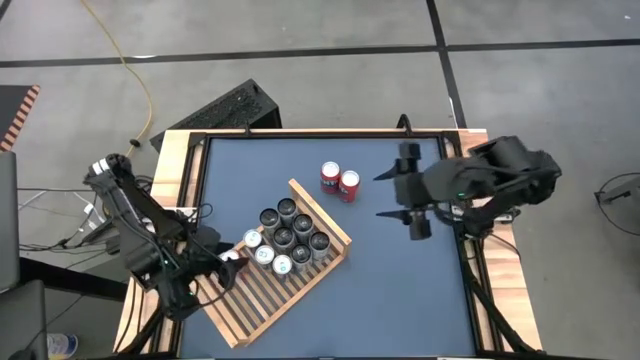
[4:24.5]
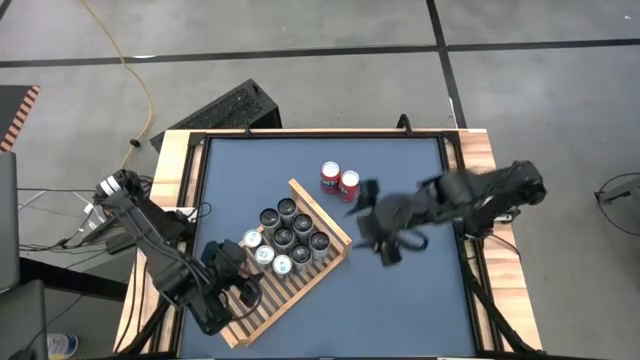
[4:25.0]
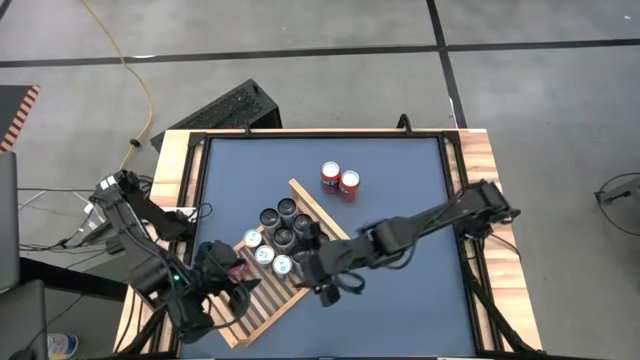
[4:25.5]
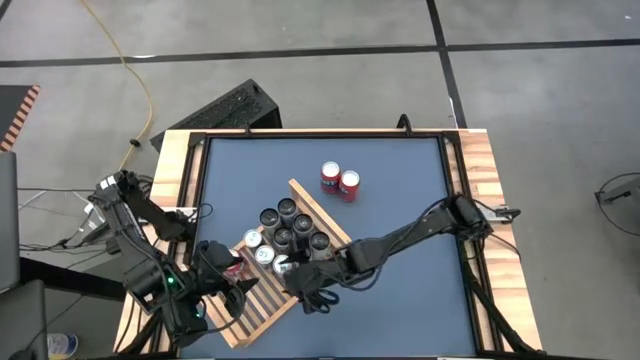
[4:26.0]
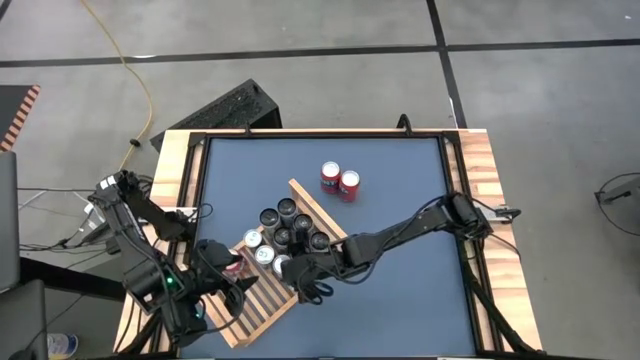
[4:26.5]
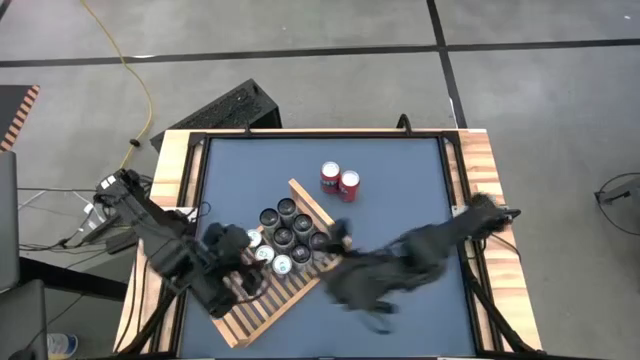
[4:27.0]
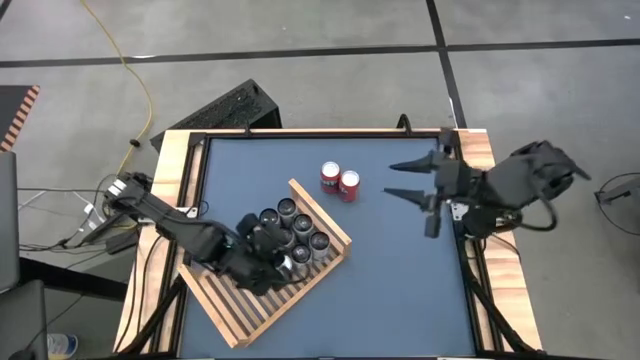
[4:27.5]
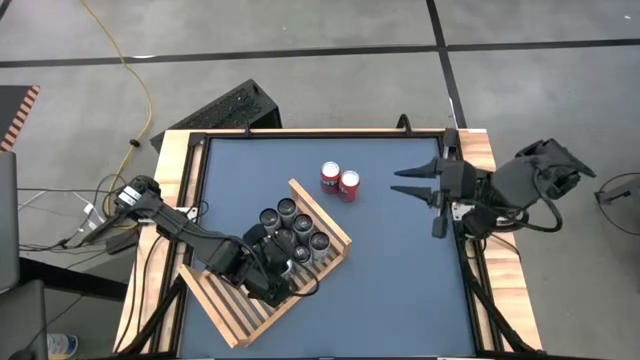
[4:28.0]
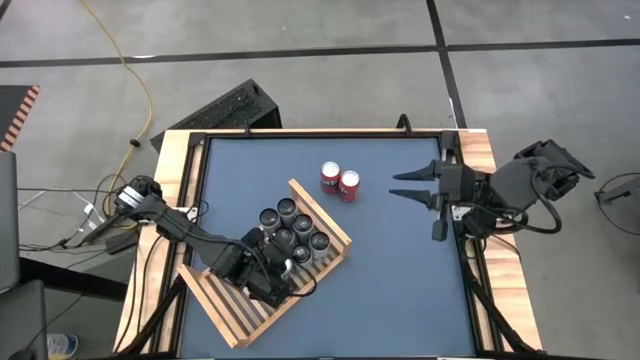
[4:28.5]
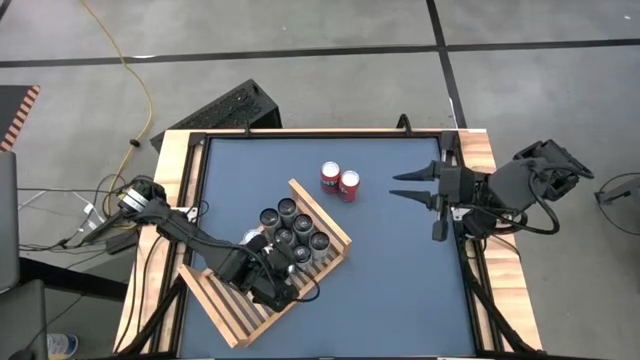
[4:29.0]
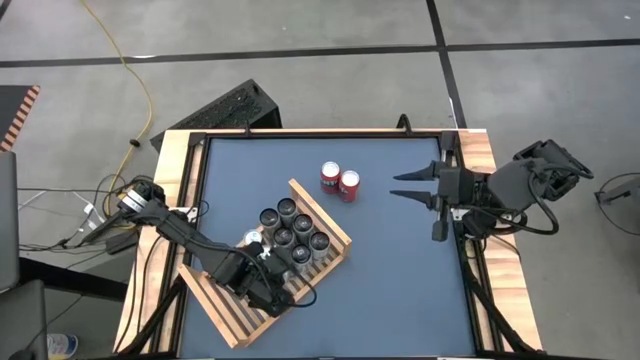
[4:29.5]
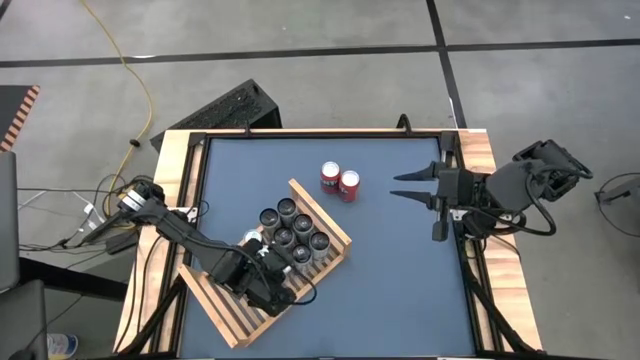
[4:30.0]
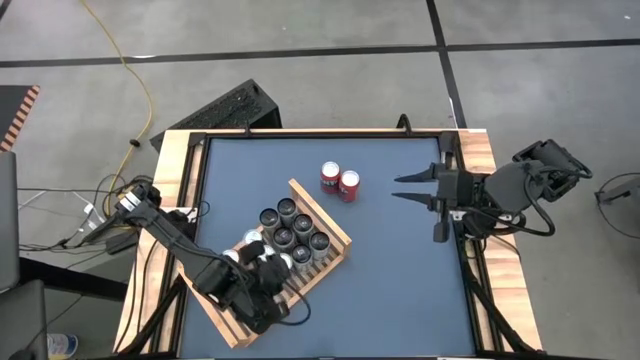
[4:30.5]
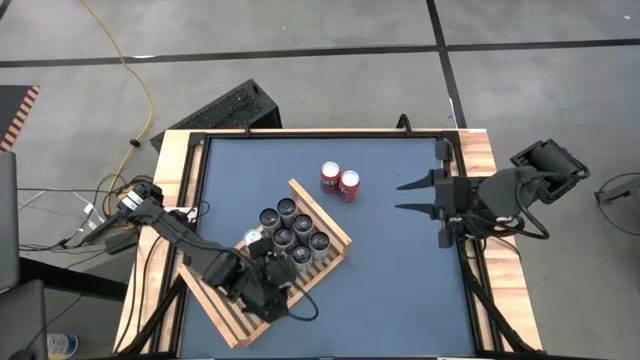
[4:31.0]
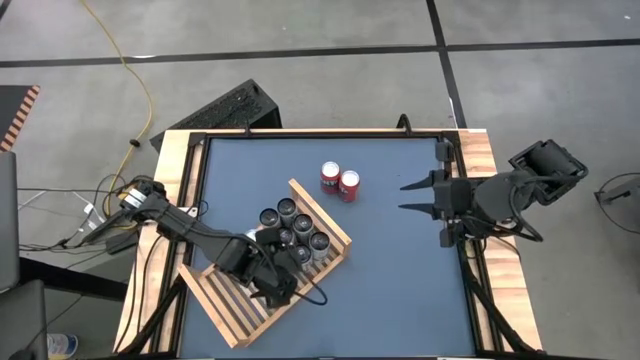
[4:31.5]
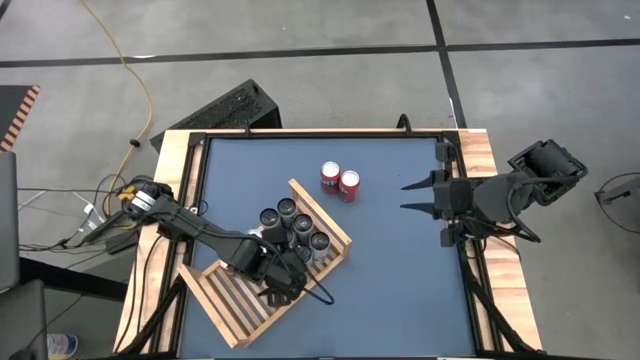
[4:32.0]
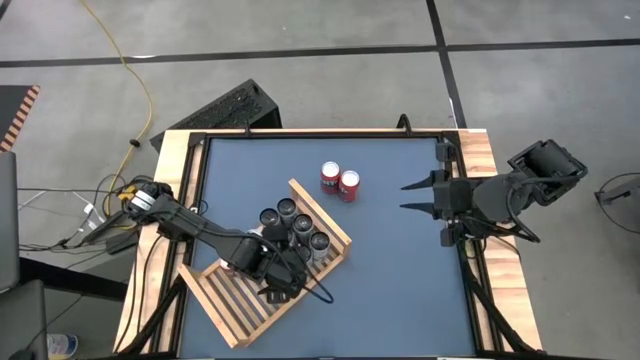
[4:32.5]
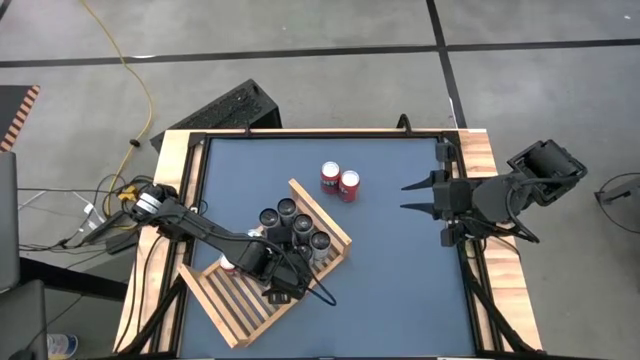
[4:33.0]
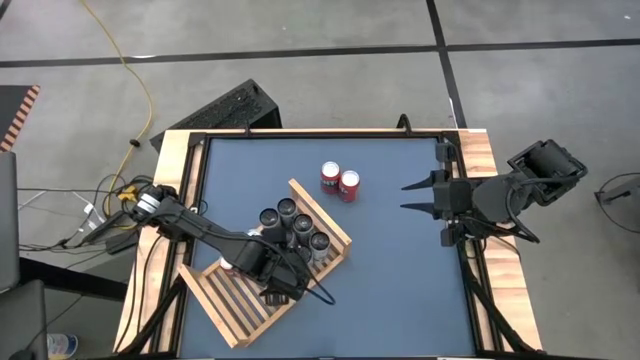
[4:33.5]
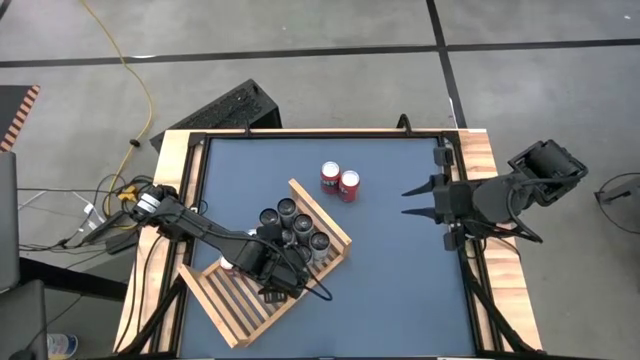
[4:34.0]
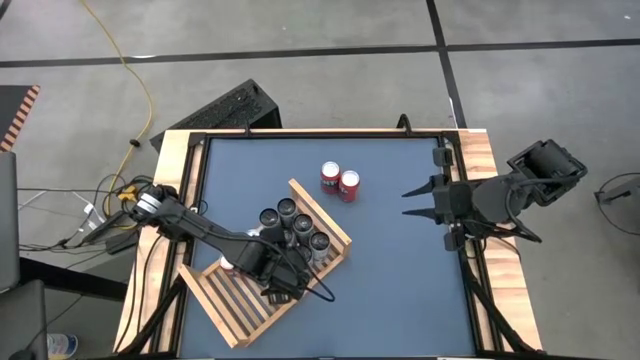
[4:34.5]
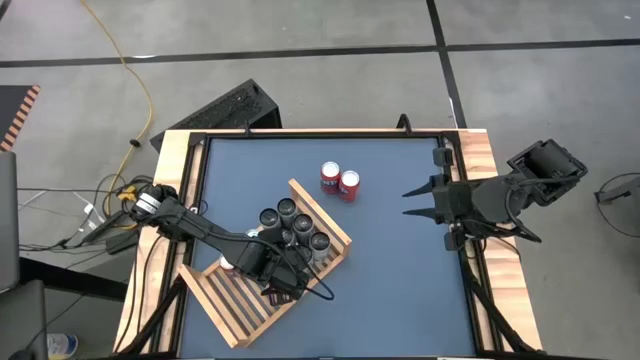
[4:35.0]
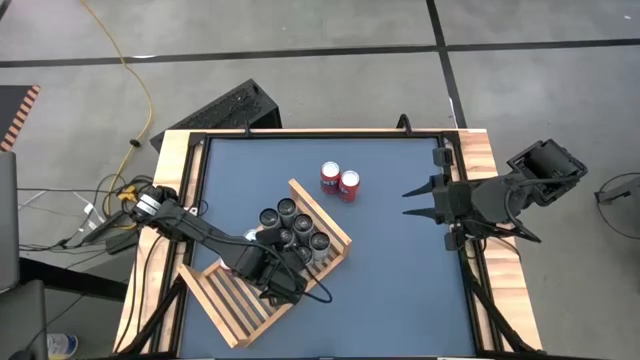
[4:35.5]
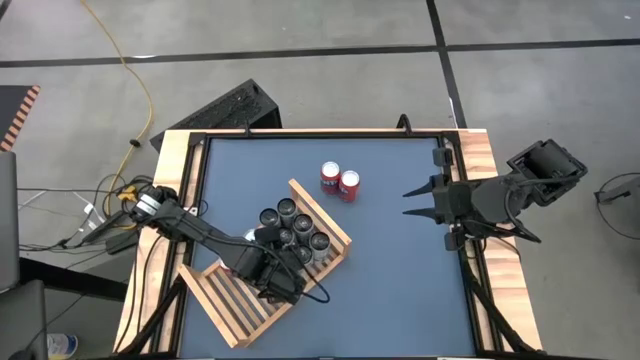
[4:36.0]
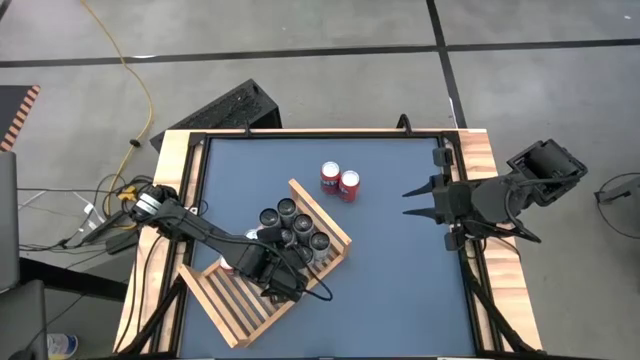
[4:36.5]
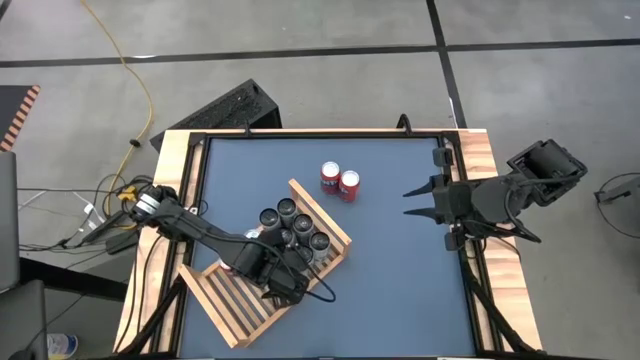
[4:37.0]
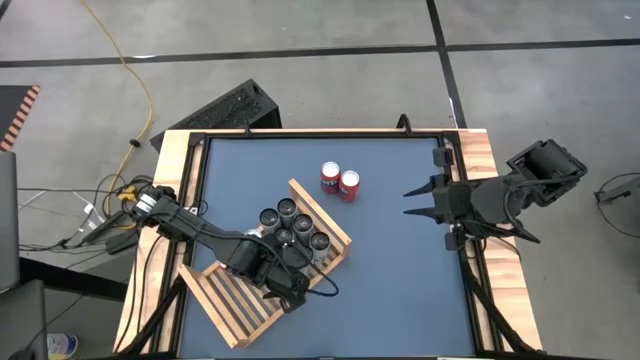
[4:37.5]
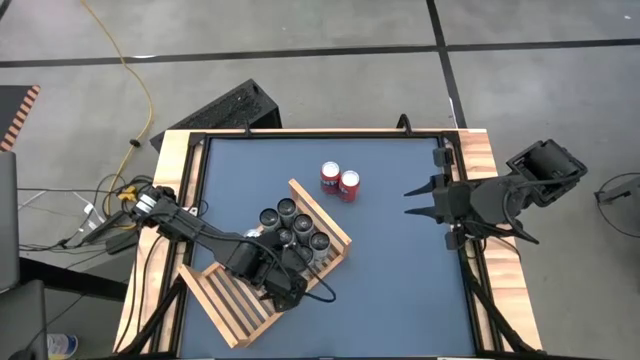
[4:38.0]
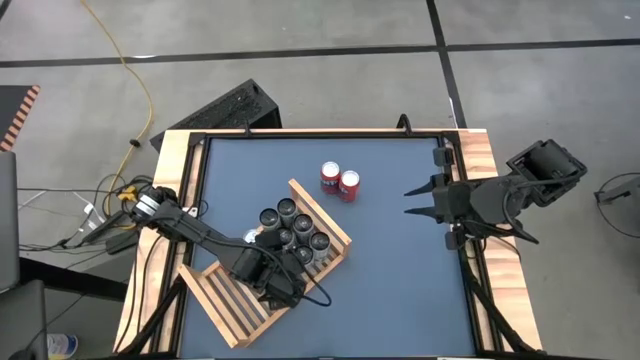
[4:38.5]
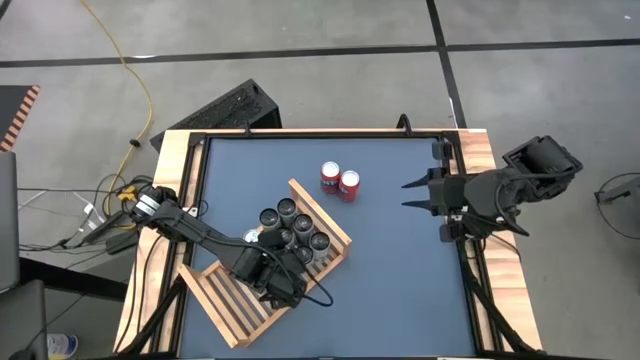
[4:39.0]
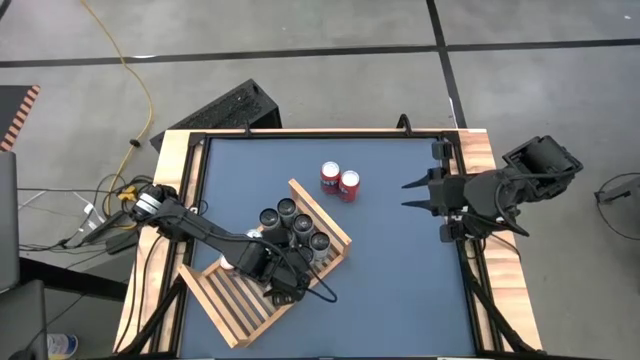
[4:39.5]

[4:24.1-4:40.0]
Task: Place canned beverage on shelf
Adjust the blue soda can on the shelf

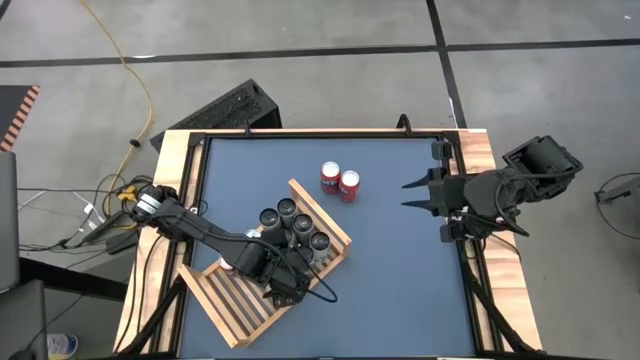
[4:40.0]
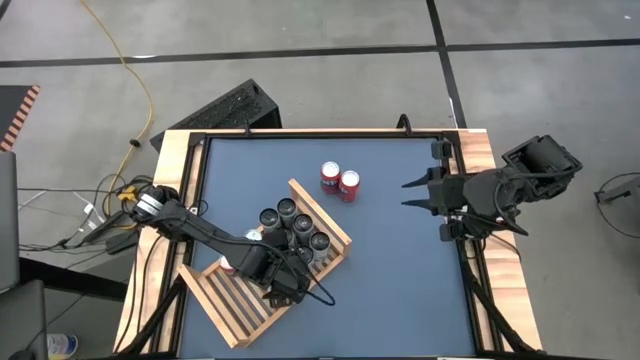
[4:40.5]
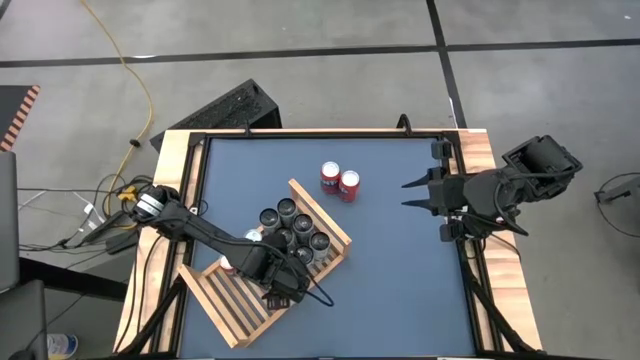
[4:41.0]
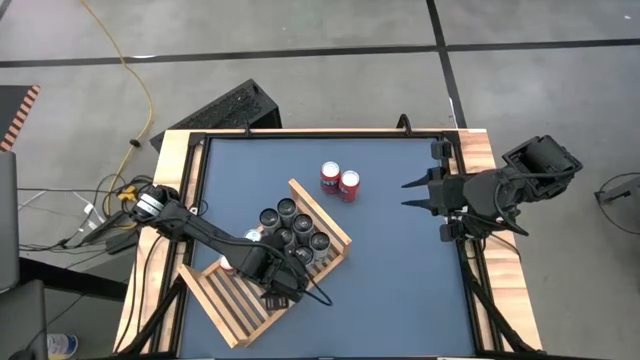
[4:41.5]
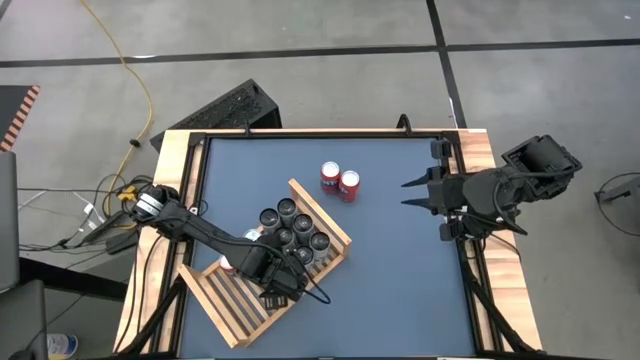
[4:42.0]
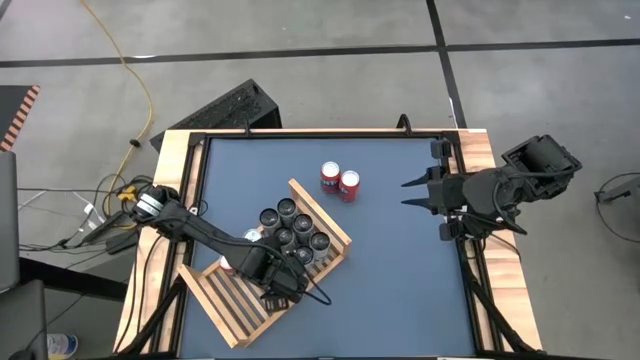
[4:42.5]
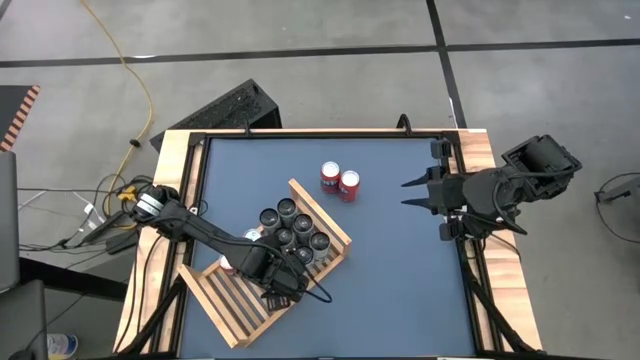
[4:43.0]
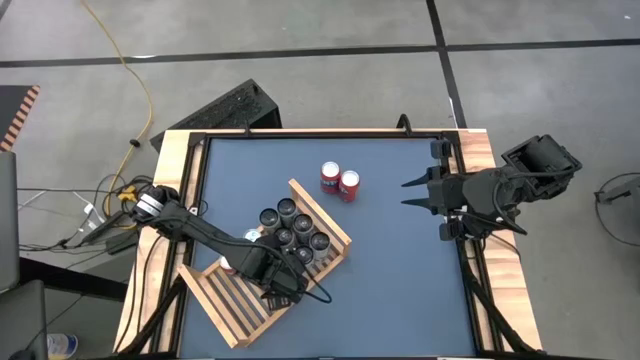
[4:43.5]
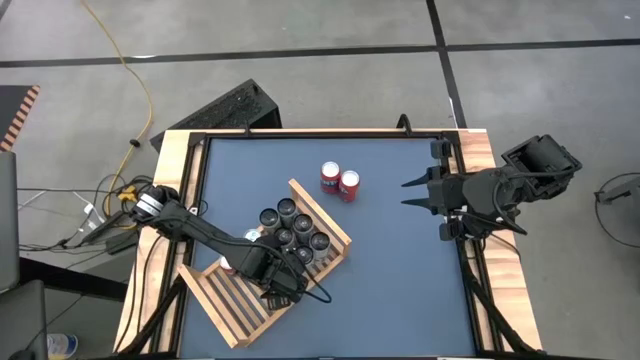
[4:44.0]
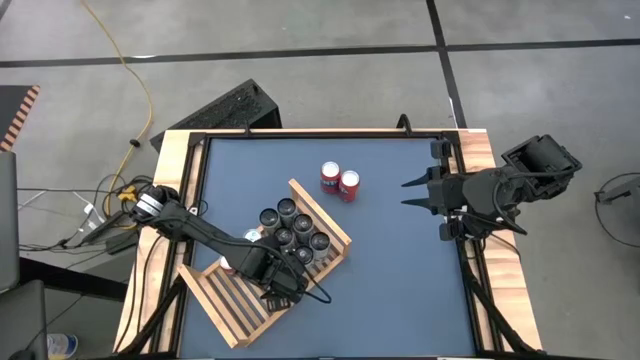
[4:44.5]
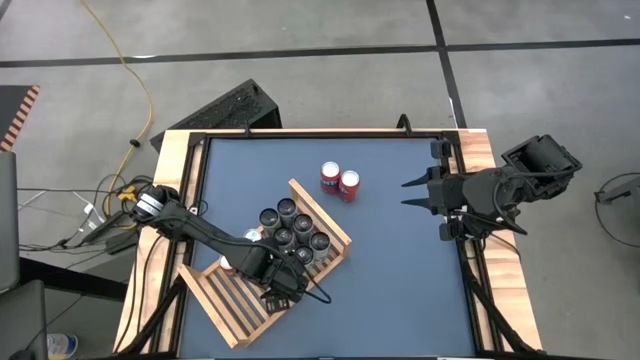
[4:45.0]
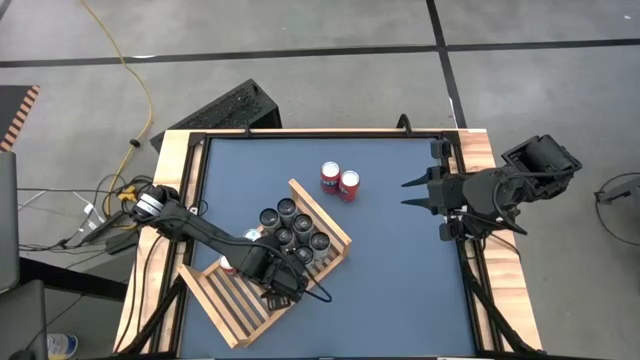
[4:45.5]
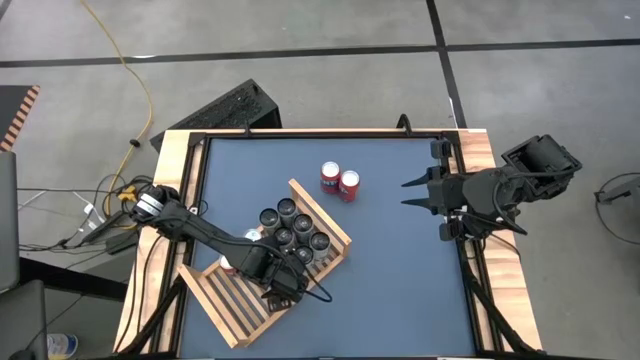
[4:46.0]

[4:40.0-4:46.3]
Adjust the blue soda can on the shelf
